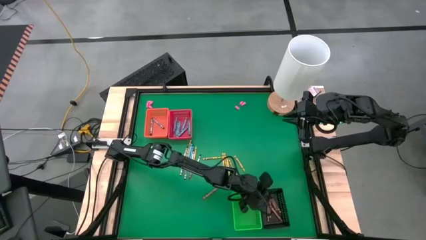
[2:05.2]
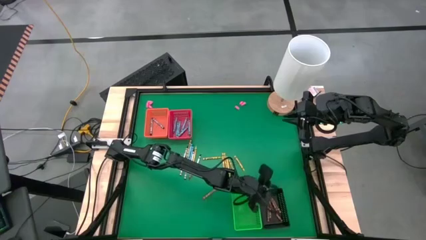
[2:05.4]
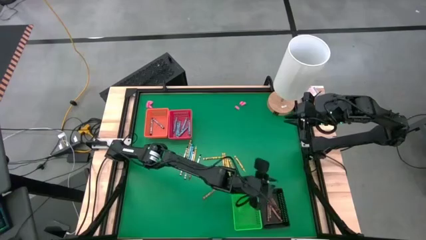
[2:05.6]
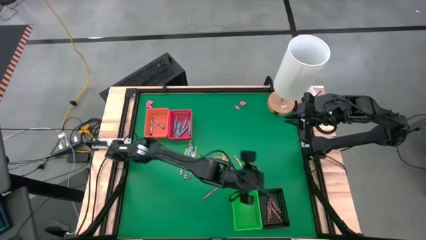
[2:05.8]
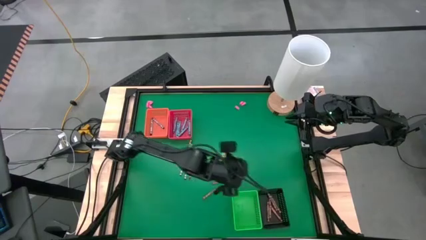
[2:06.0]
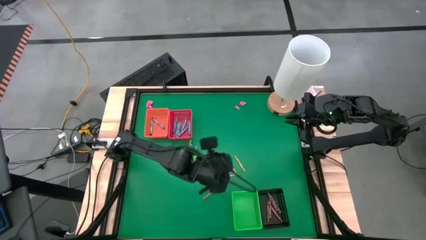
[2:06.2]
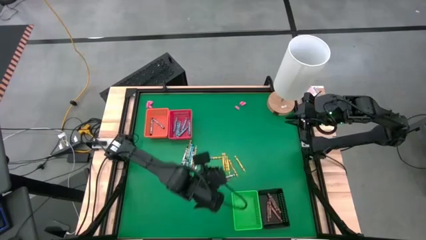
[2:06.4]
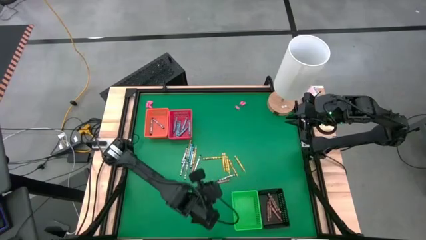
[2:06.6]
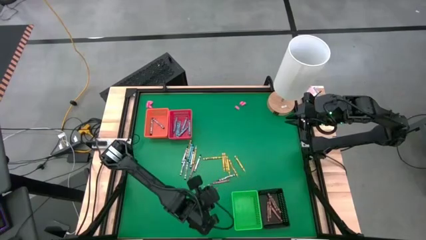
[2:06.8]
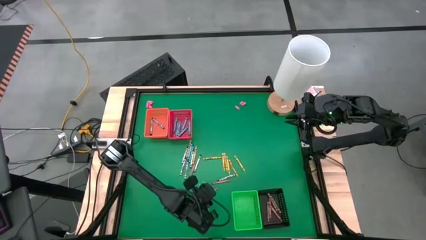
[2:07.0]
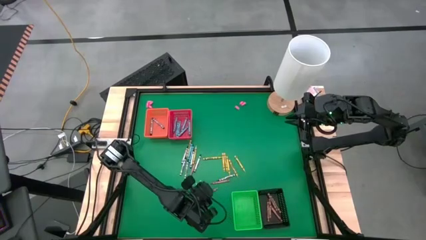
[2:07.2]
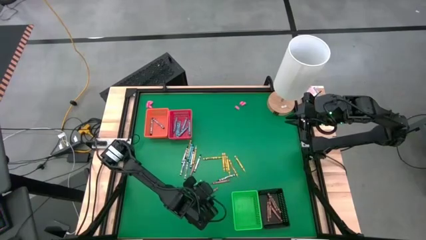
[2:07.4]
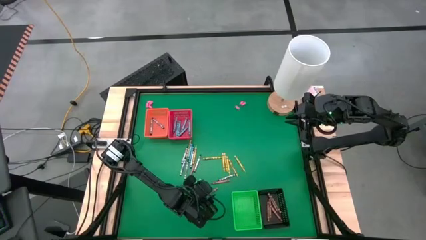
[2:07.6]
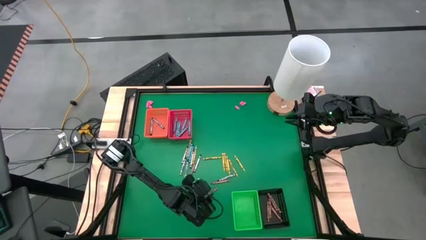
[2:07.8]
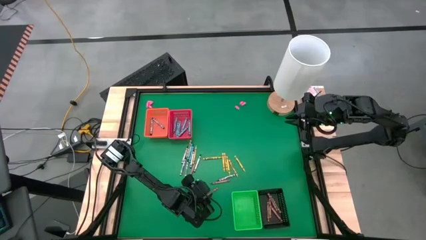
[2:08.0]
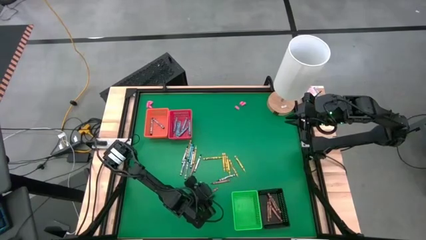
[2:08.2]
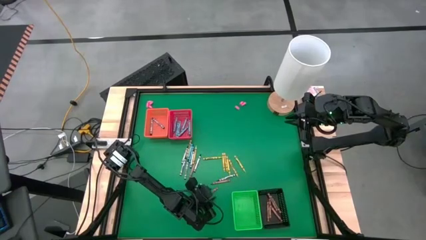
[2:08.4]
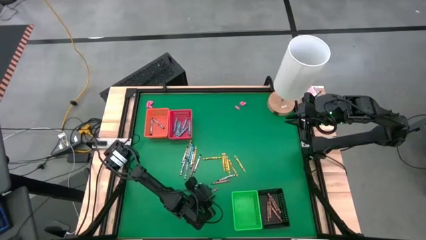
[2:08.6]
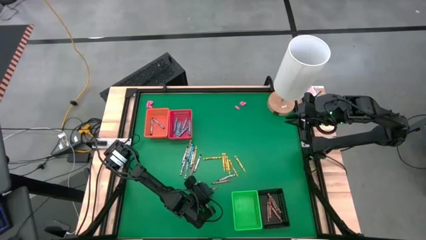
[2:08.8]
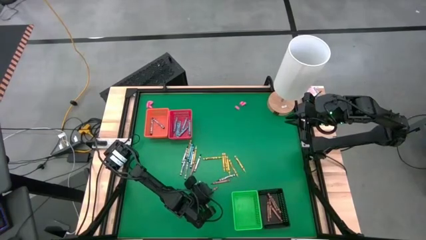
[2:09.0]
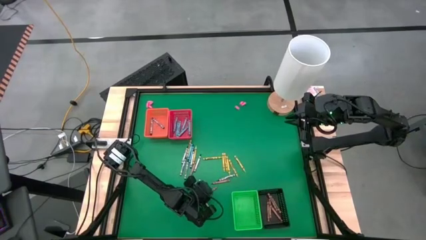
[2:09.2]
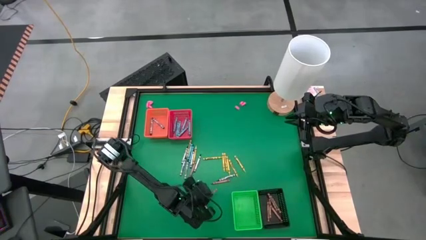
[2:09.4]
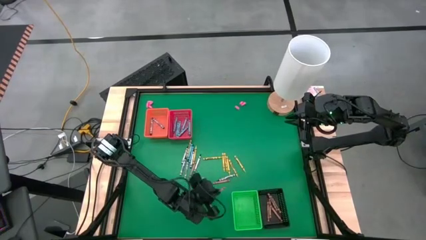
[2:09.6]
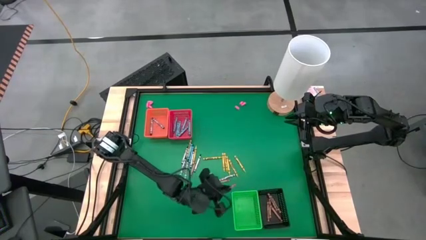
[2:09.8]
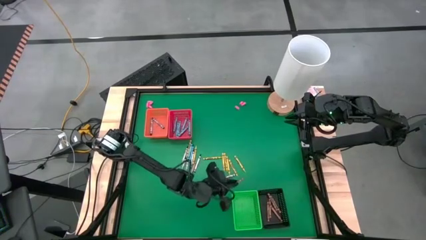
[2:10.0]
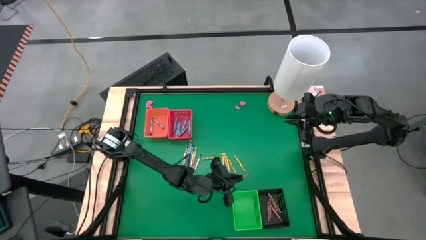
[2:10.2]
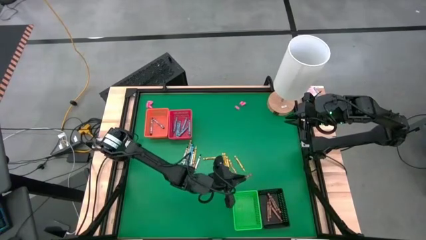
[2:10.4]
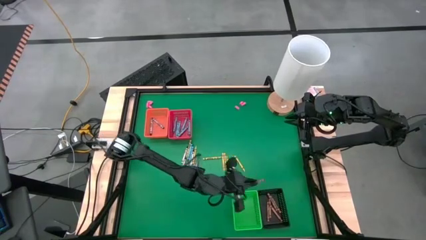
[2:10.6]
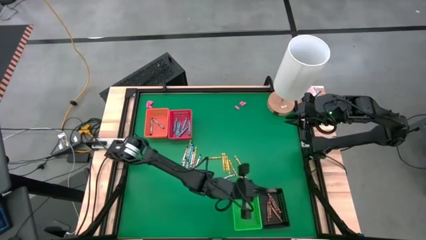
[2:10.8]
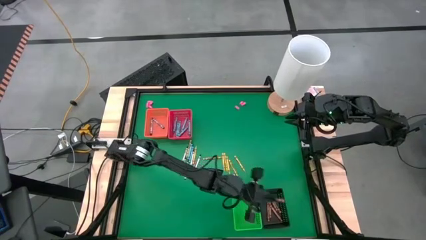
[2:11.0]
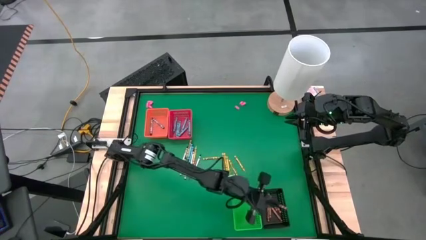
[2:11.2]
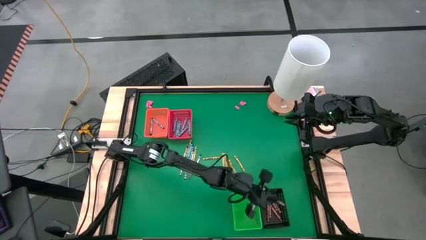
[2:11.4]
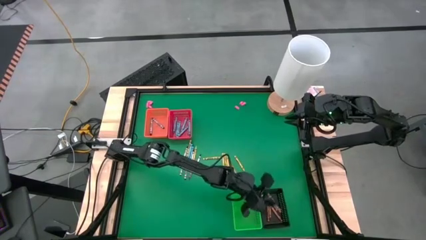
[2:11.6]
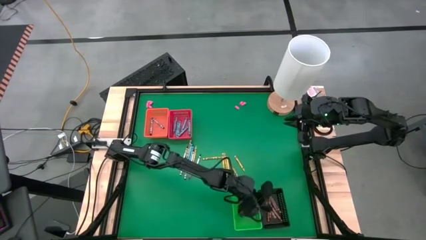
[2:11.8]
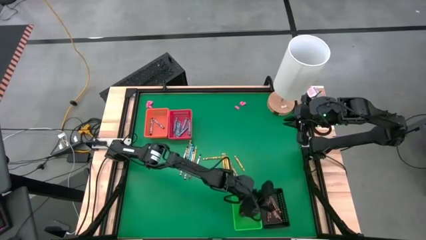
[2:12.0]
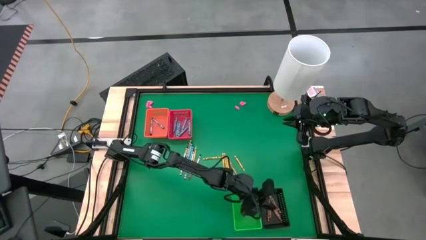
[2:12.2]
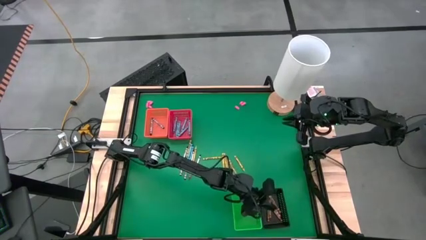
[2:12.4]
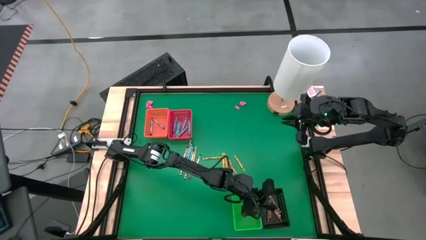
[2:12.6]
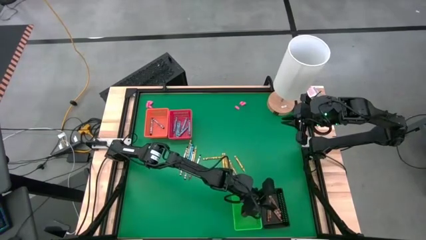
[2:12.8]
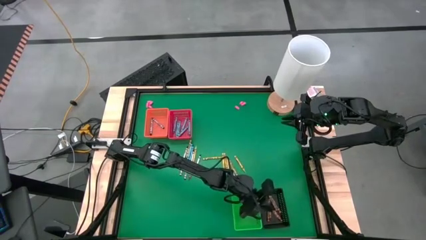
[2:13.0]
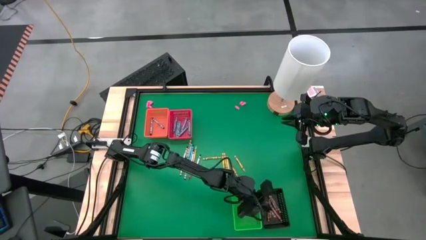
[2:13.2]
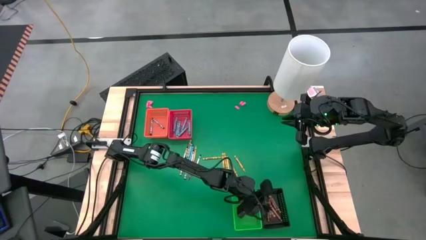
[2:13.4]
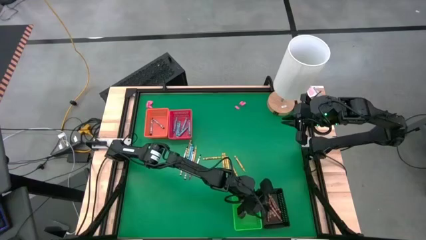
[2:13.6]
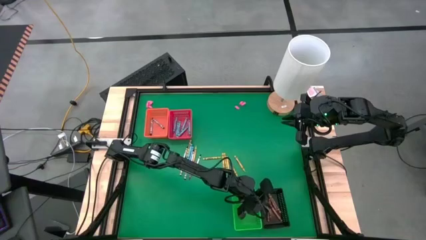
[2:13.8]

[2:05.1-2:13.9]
Task: Sort crayons
Put the brown crayon into the black bin

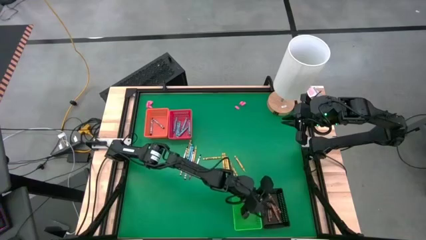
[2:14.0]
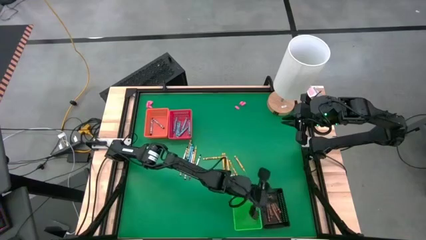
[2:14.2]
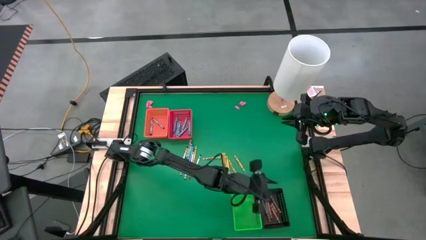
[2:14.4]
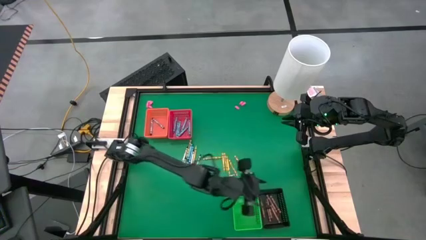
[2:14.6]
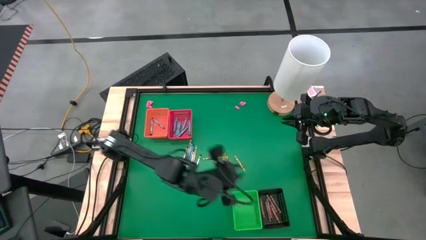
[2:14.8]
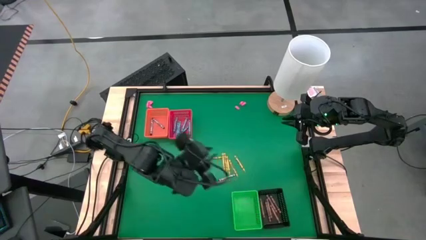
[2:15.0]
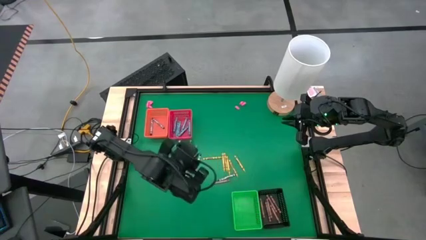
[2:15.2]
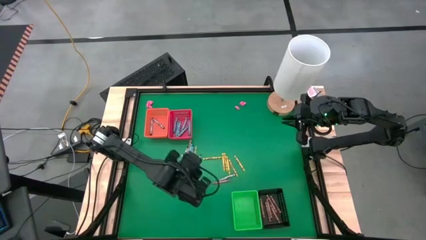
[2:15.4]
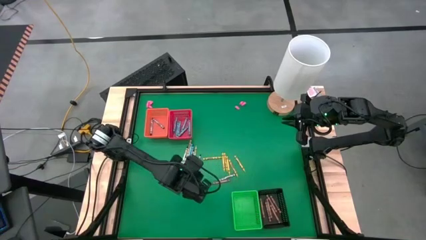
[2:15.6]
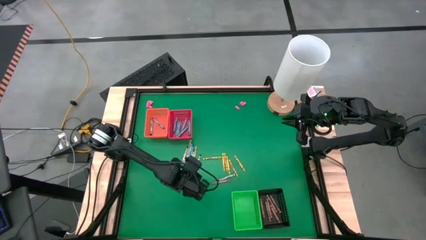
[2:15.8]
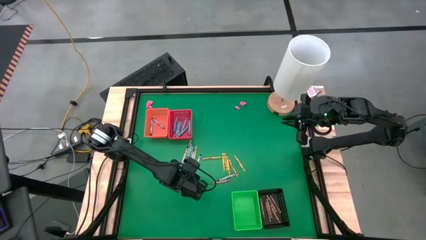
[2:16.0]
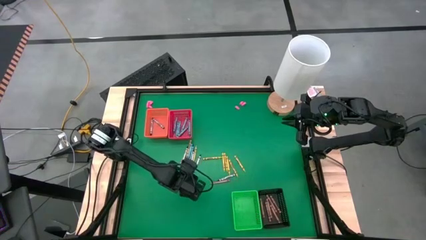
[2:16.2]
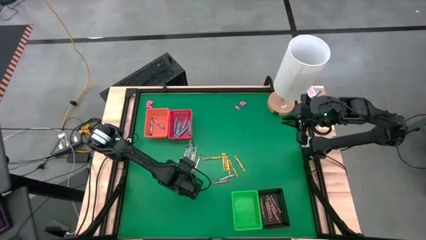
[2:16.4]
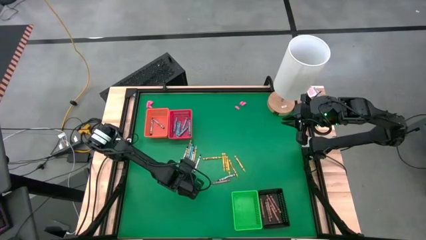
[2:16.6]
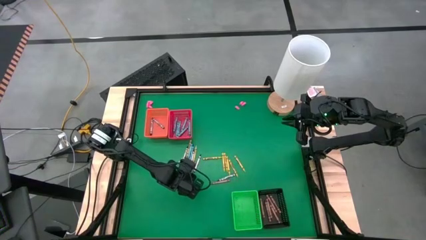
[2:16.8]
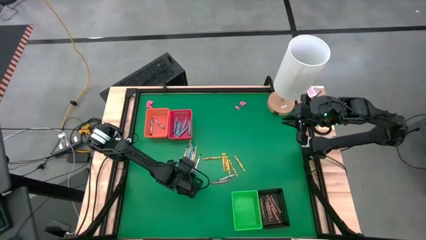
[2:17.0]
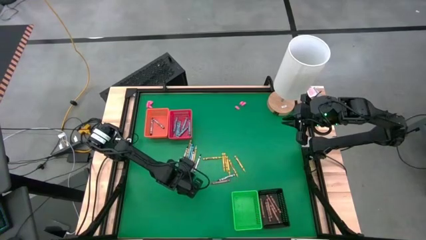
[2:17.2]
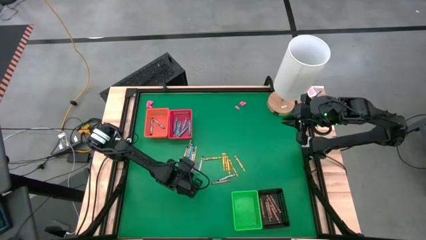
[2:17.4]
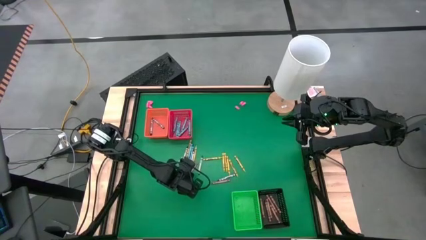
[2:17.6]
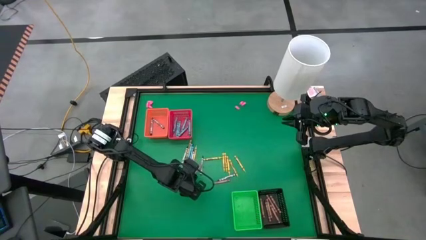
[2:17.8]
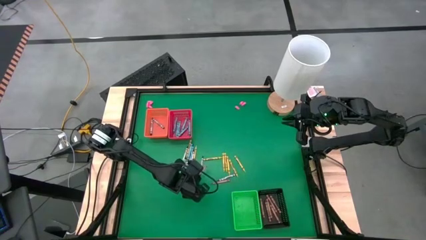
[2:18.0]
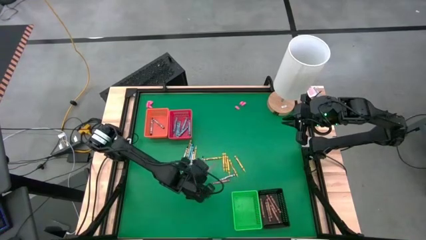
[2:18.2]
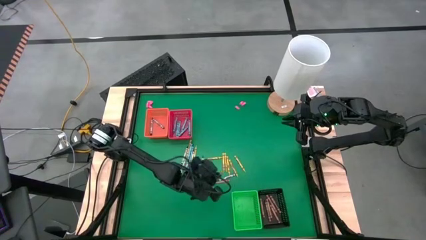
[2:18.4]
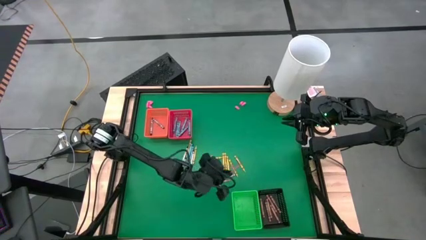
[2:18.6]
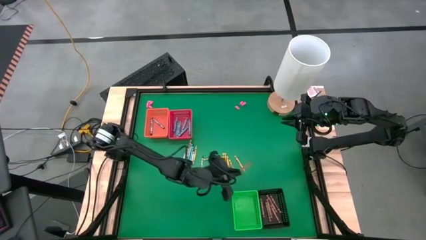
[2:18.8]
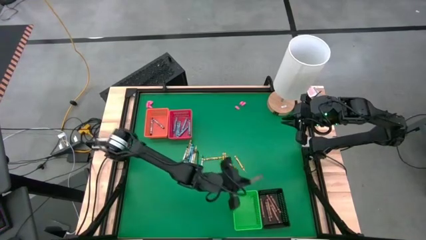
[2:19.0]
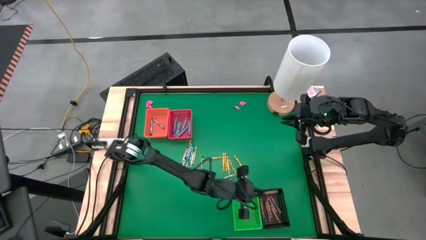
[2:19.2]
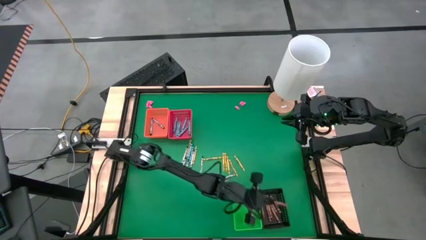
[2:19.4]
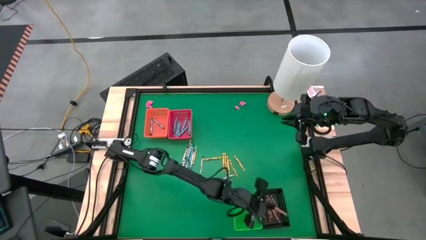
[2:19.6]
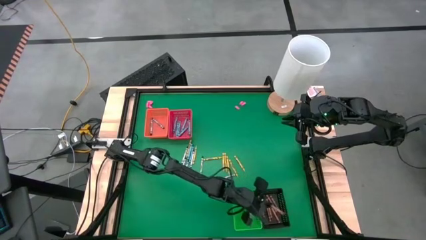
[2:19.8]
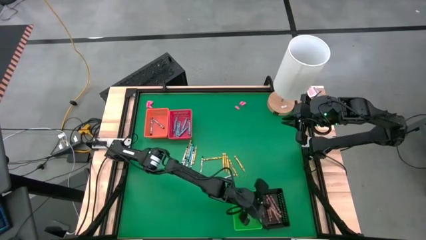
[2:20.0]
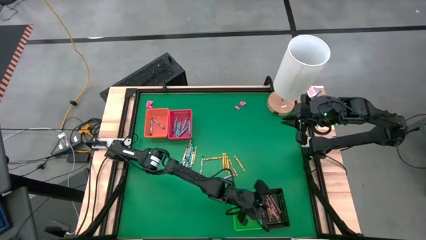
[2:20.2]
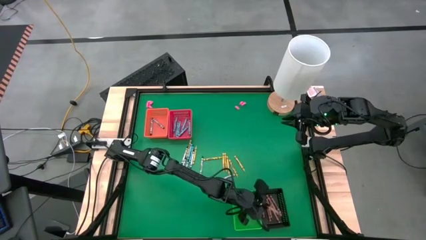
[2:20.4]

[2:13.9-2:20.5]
Put the brown crayon into the black bin
